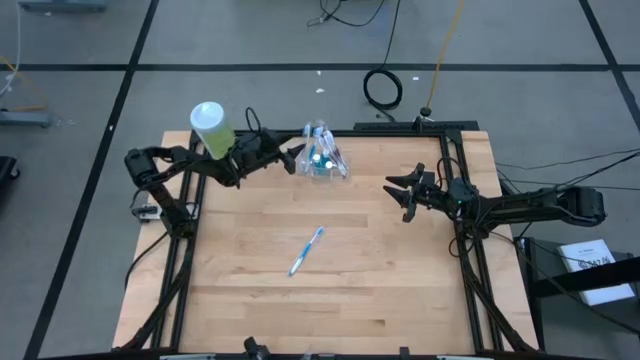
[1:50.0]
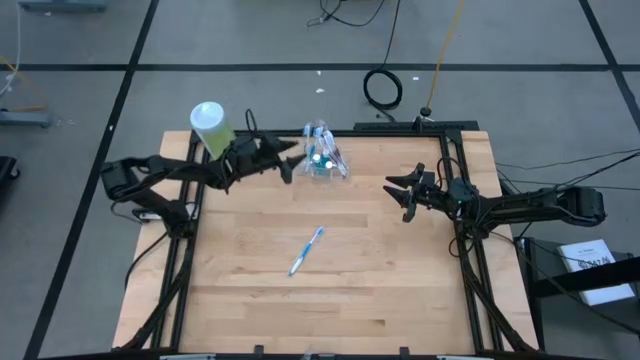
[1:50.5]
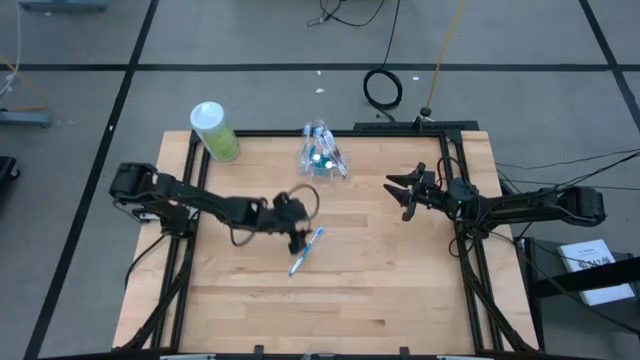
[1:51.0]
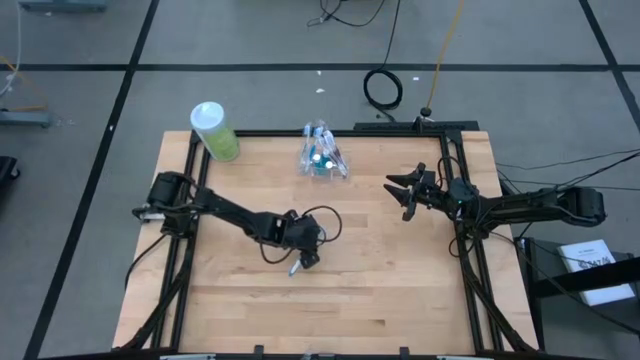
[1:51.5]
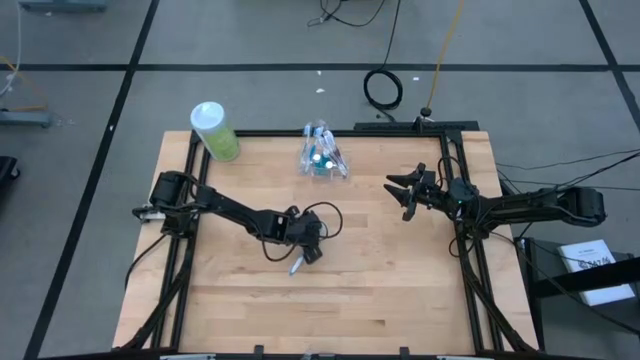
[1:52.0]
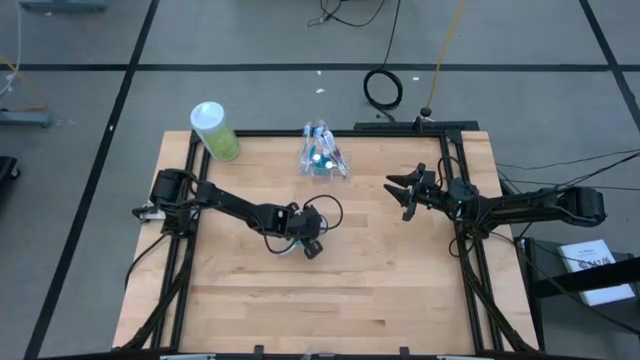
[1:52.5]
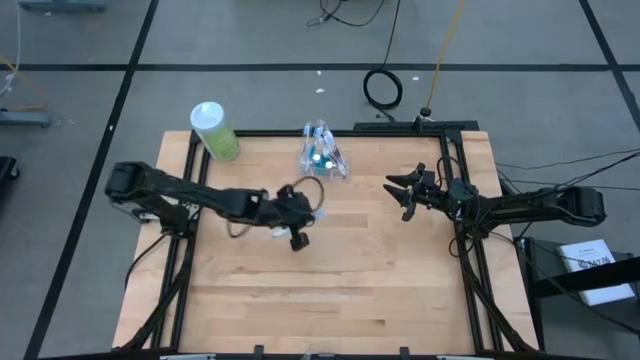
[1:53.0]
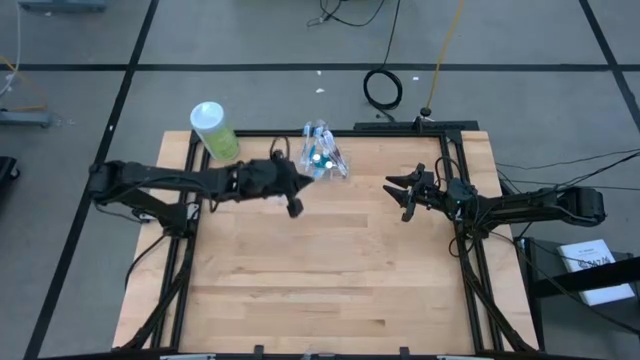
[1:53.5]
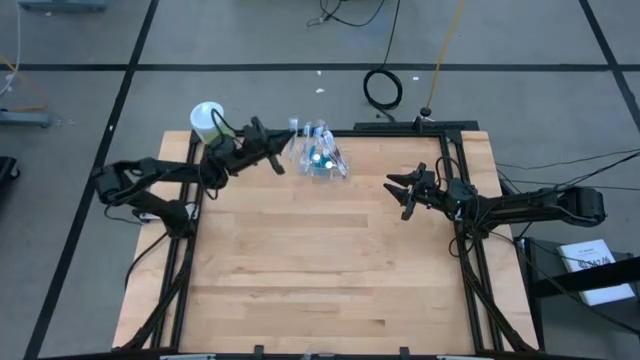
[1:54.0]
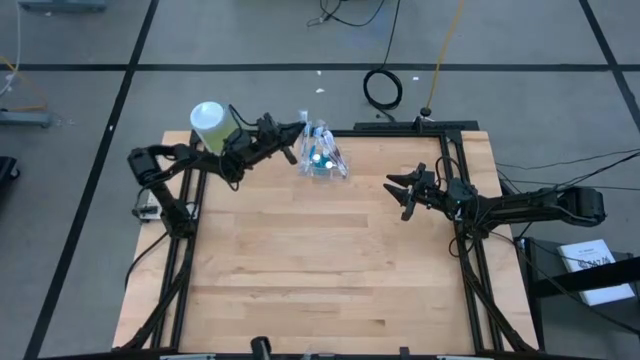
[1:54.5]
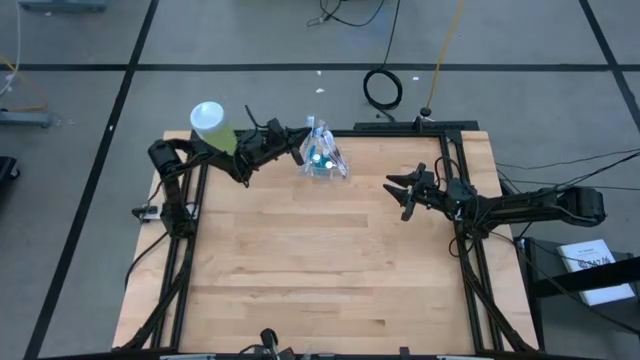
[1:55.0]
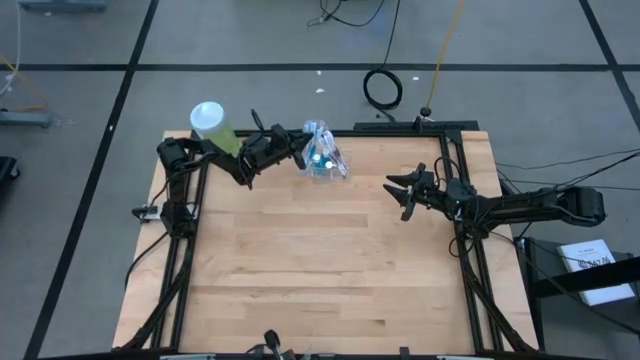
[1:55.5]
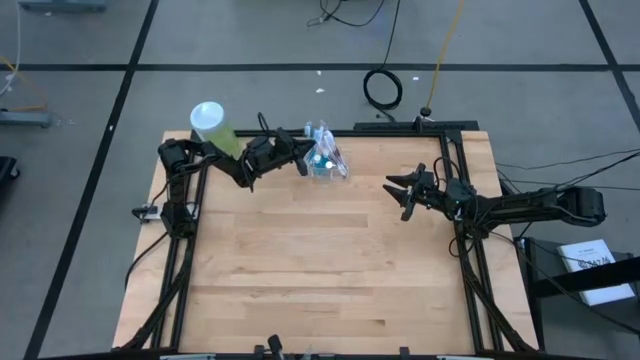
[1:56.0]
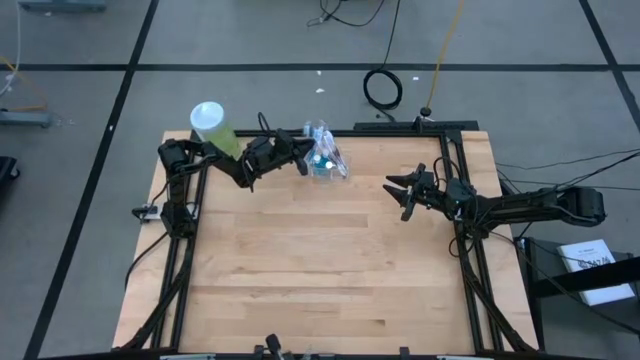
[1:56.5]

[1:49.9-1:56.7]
Task: Pick & Place toothbrushing station
Put the blue toothbrush into the transparent organizer

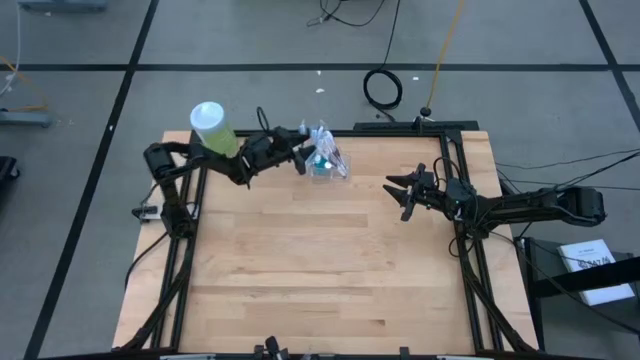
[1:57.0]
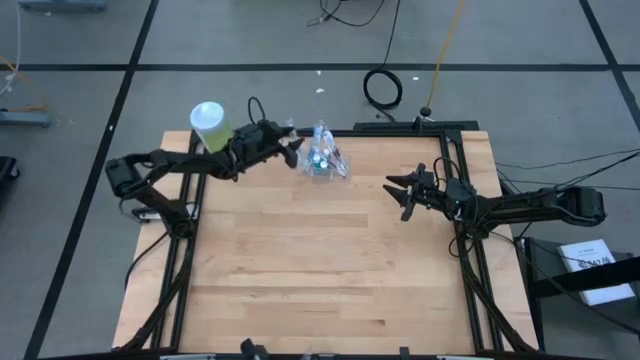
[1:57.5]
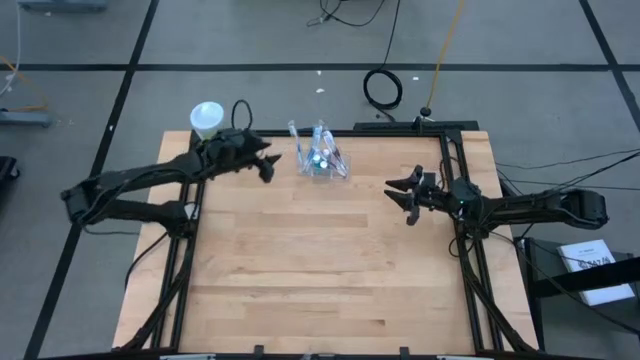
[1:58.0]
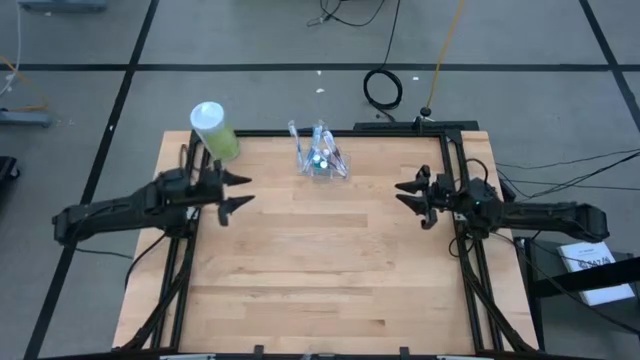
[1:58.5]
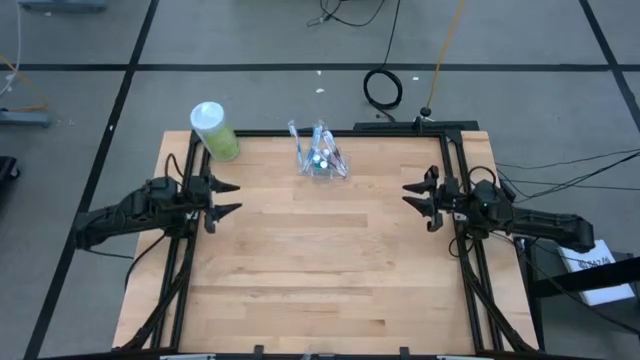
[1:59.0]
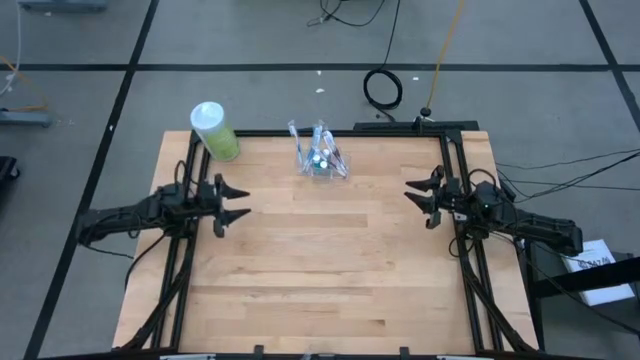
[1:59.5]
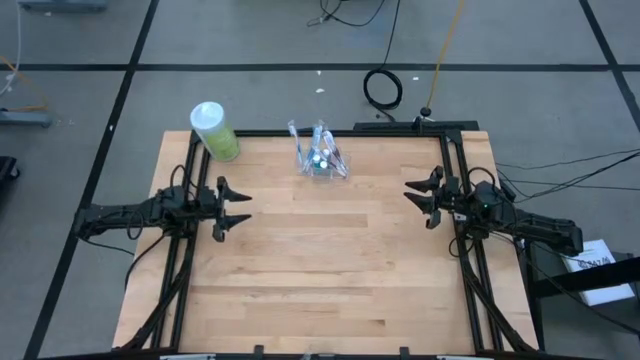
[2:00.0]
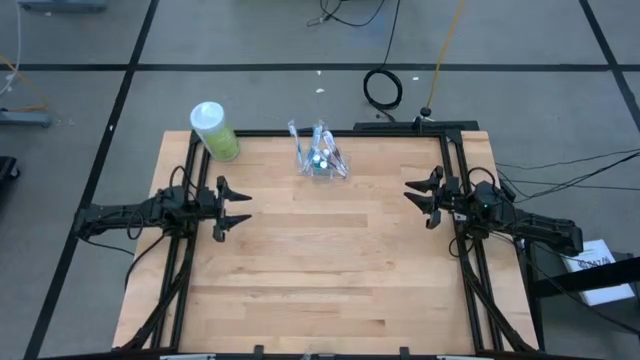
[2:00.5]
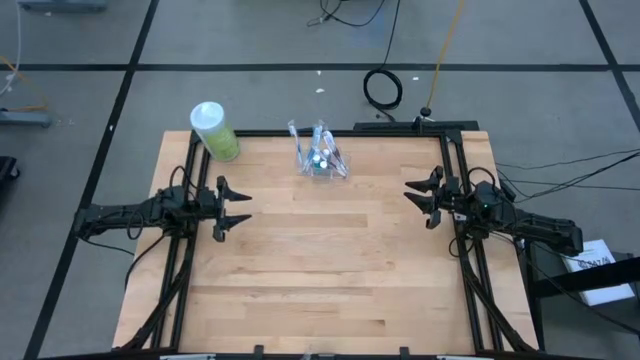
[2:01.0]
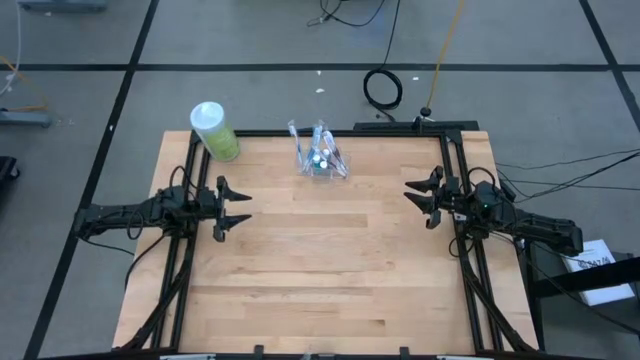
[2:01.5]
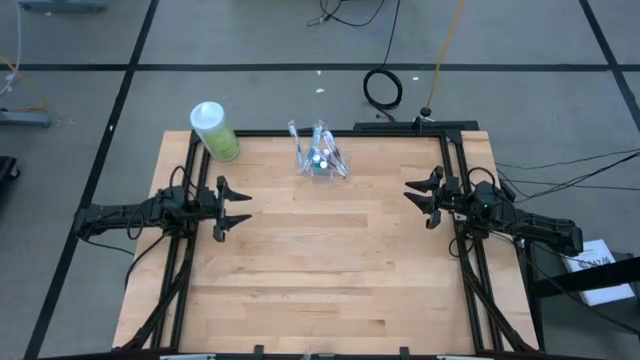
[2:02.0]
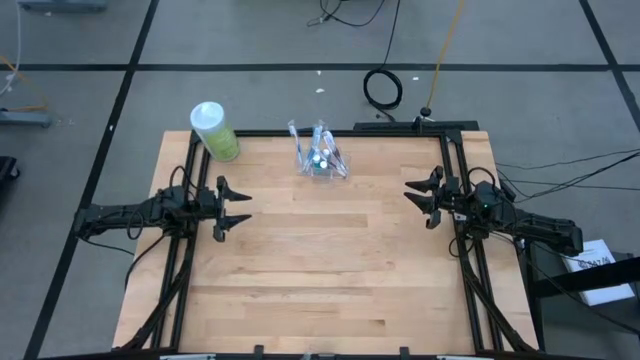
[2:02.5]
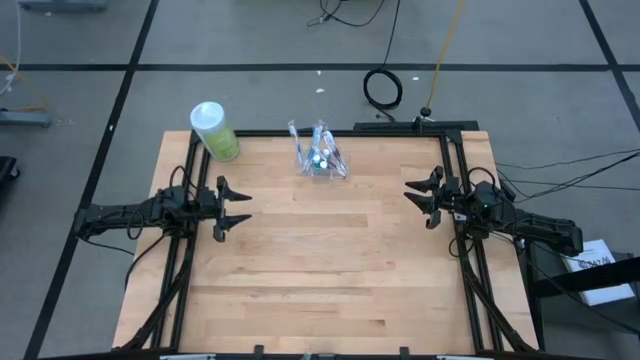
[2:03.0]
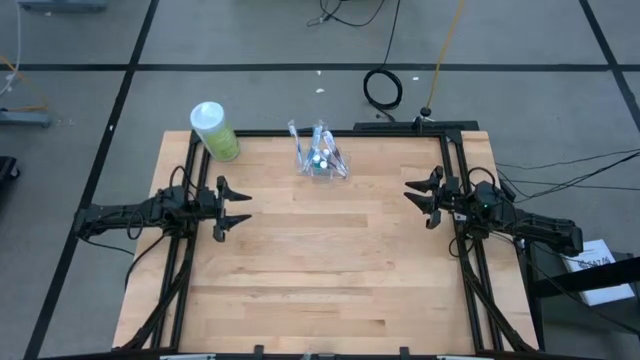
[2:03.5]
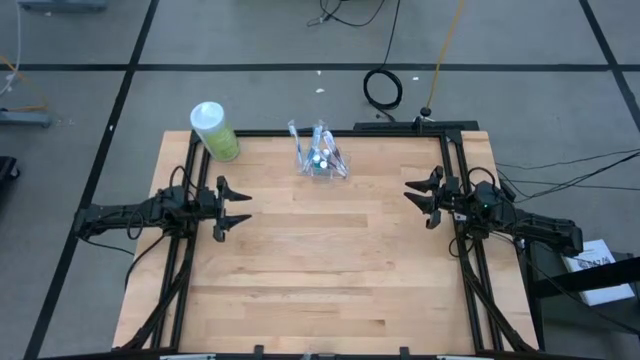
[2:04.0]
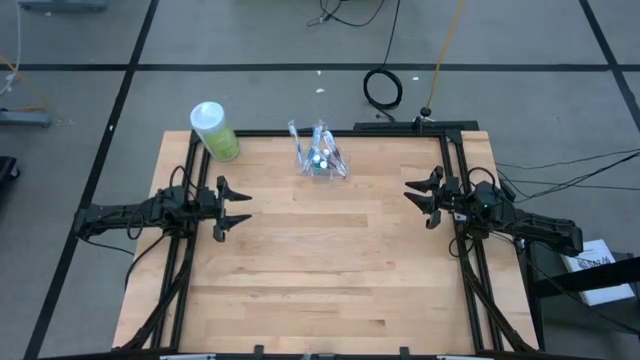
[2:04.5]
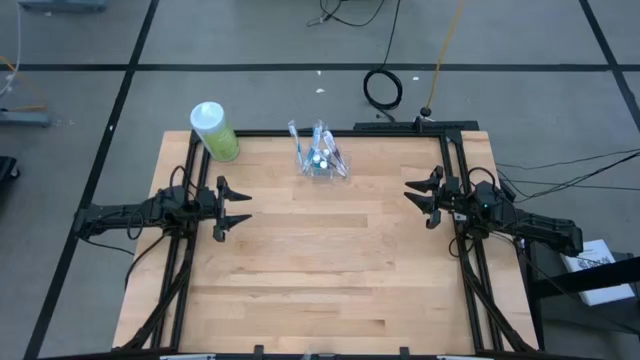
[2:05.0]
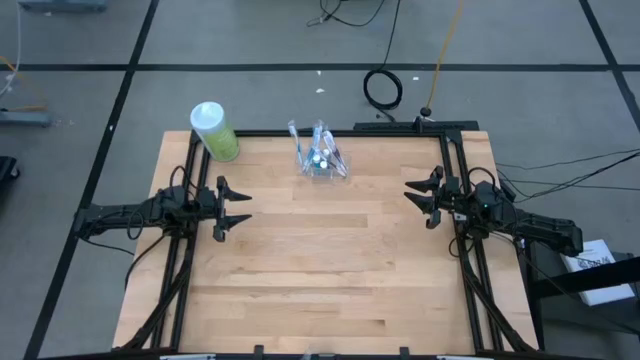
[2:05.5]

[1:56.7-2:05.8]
Return to Home Position

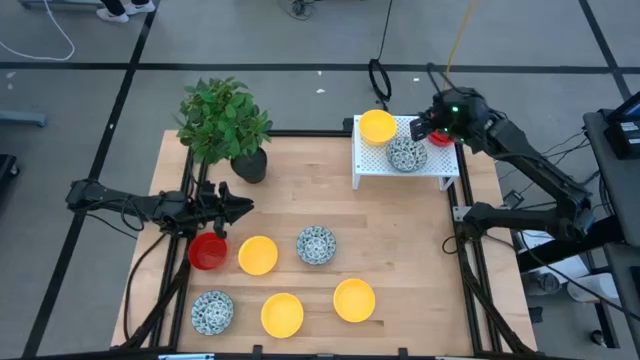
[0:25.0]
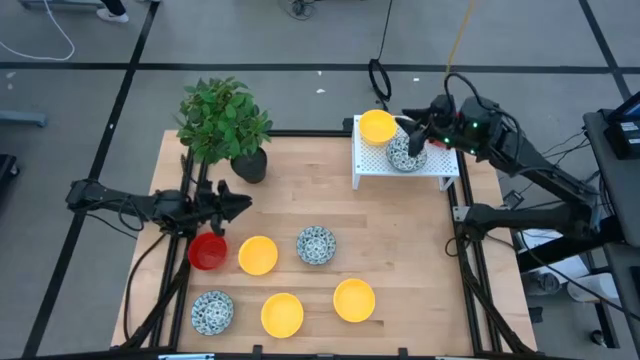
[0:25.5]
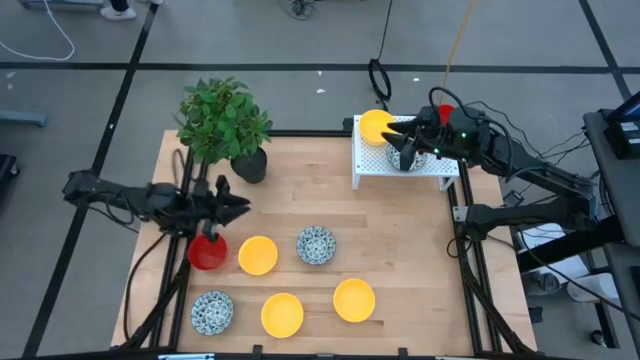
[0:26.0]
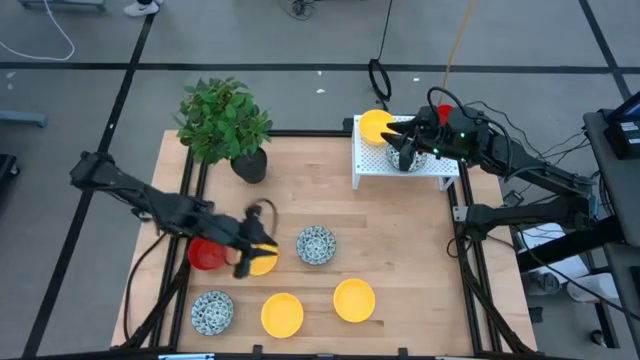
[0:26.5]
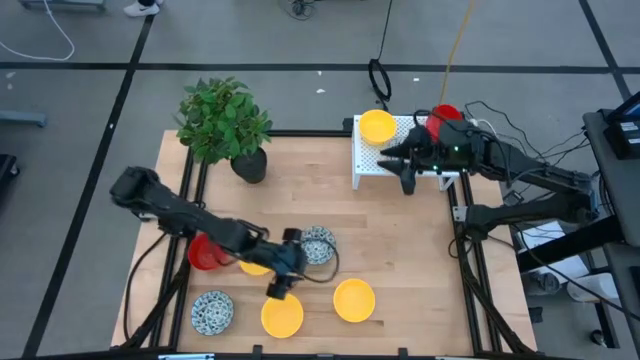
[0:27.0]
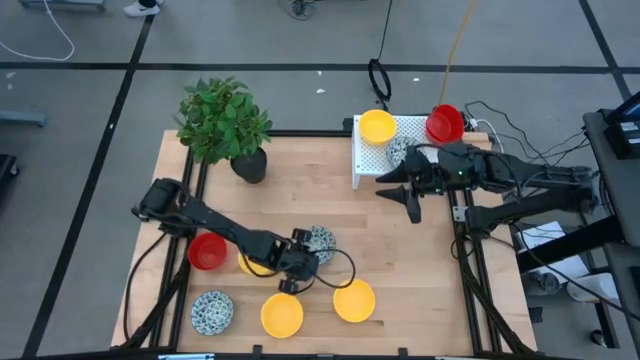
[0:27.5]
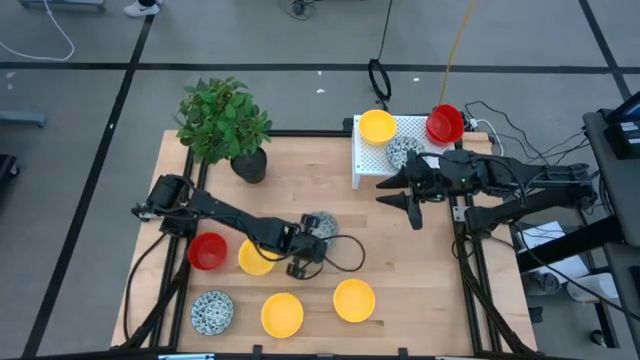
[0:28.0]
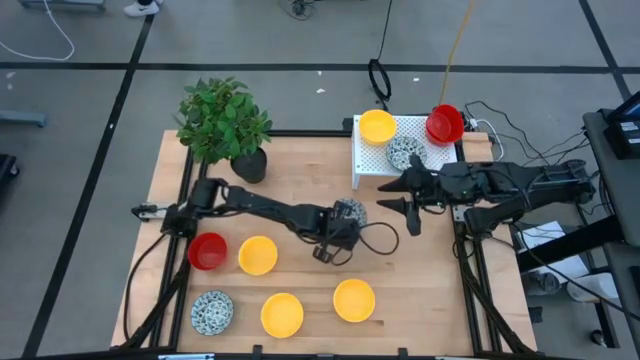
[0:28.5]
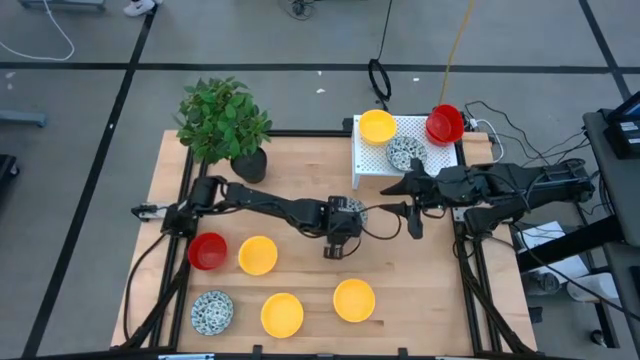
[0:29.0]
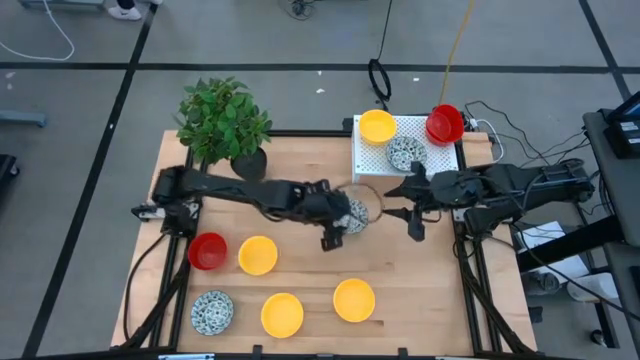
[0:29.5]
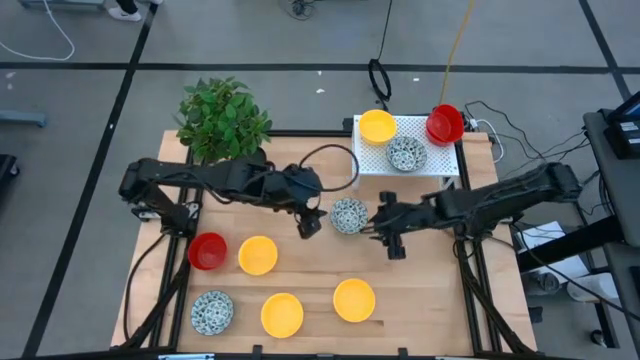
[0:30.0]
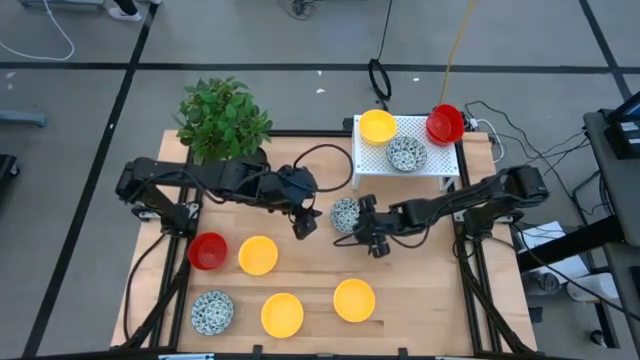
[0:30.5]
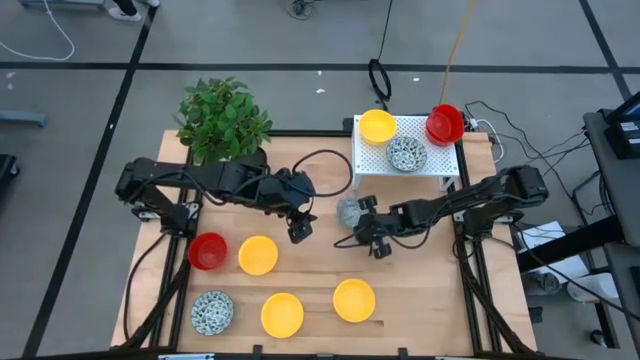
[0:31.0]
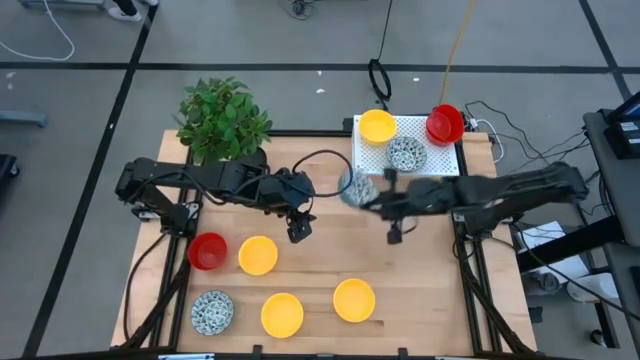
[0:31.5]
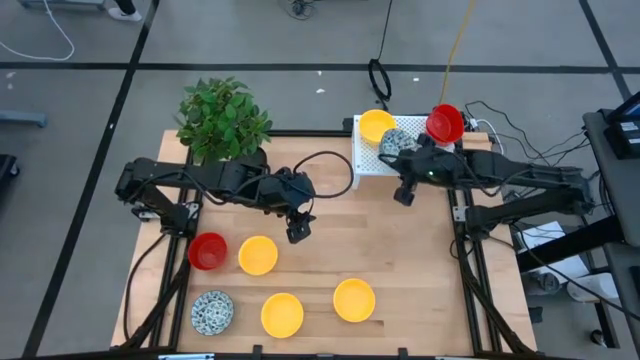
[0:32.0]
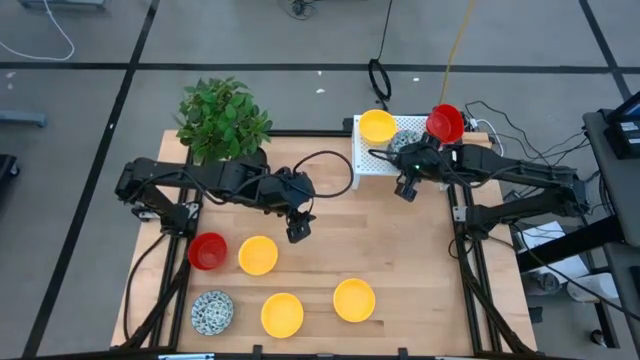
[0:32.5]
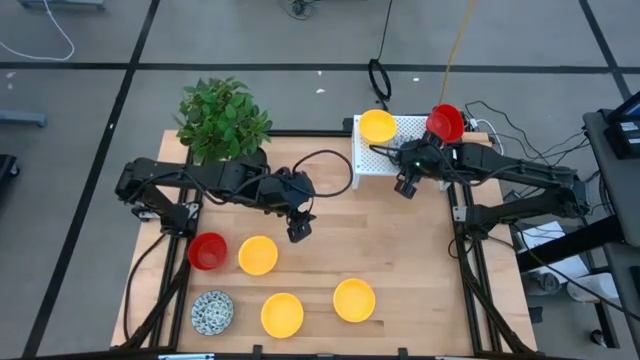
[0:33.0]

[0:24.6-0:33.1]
Task: Pick & Place Mini bowls
Stack the blue bowl on top of the blue bowl on the shelf
